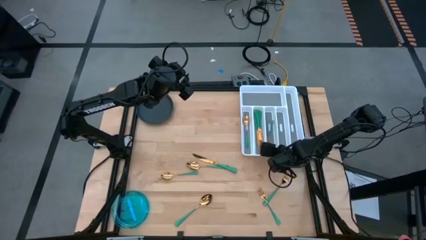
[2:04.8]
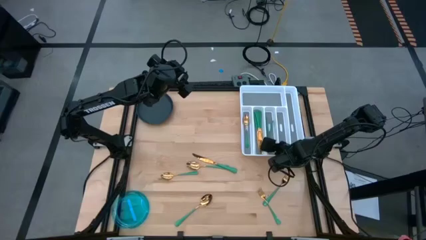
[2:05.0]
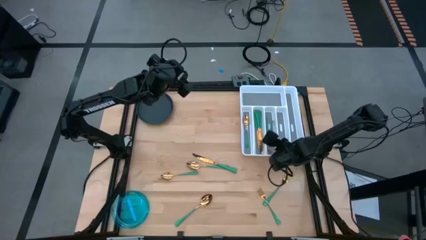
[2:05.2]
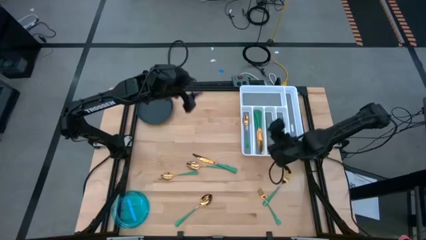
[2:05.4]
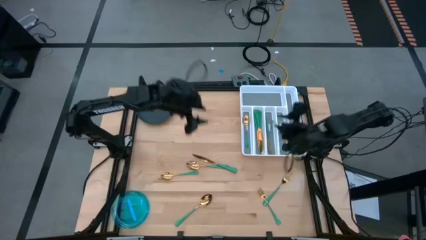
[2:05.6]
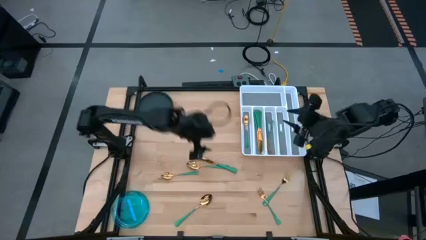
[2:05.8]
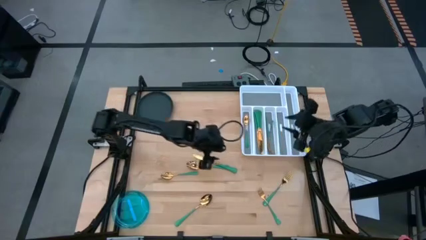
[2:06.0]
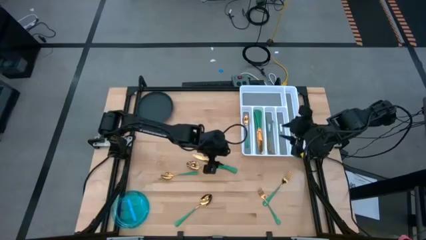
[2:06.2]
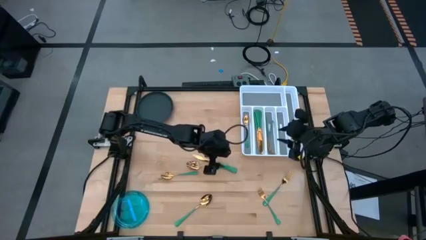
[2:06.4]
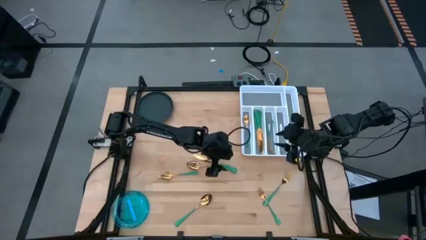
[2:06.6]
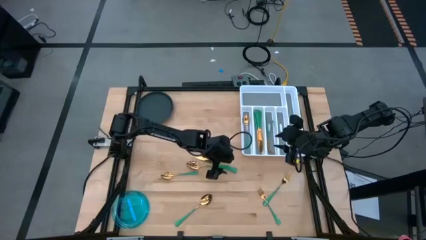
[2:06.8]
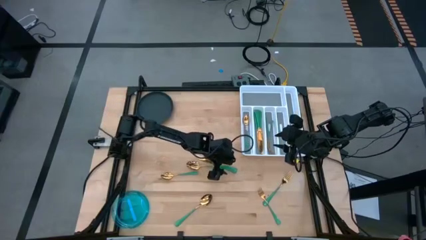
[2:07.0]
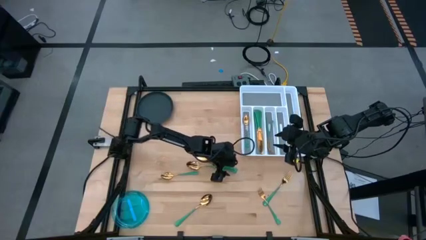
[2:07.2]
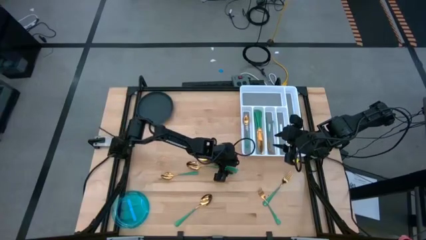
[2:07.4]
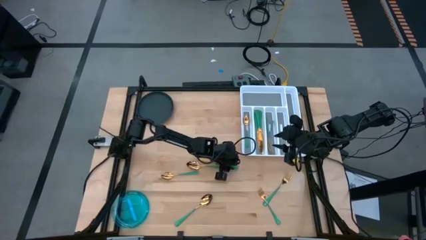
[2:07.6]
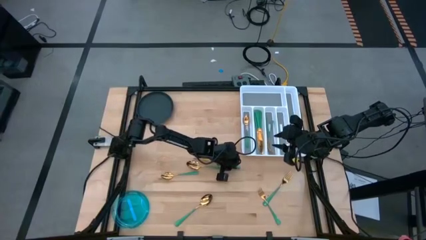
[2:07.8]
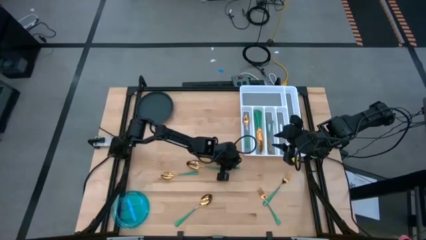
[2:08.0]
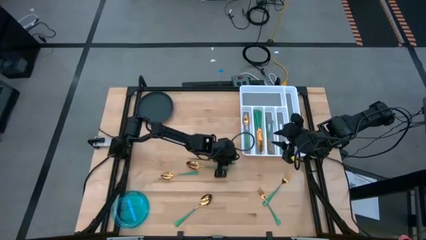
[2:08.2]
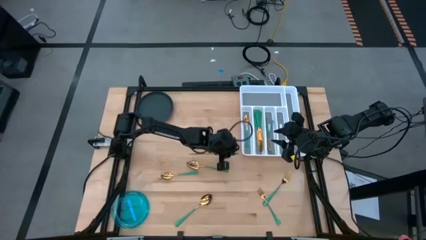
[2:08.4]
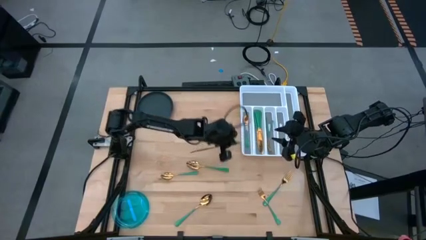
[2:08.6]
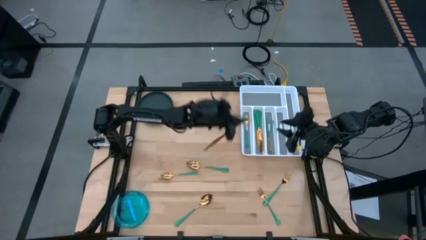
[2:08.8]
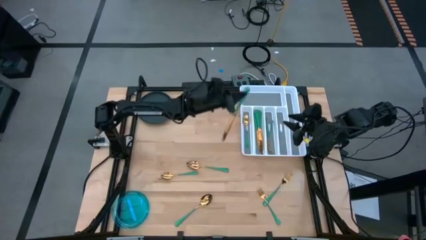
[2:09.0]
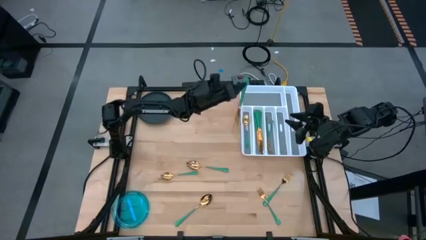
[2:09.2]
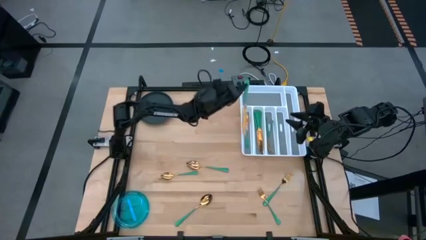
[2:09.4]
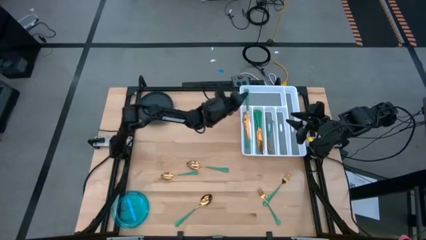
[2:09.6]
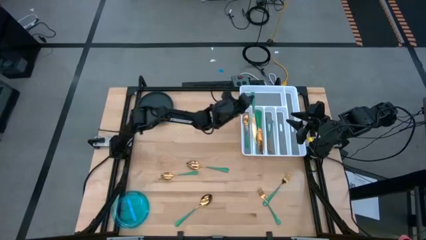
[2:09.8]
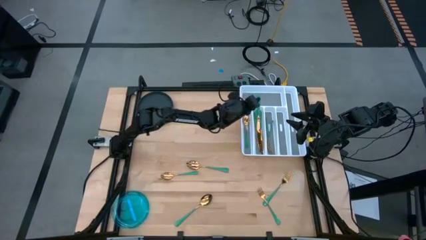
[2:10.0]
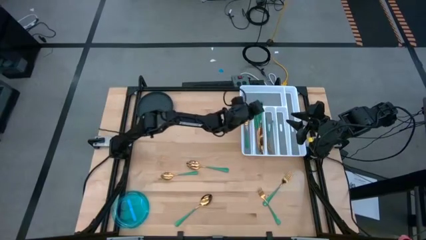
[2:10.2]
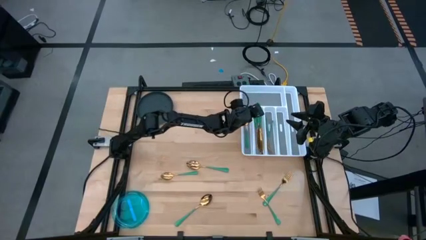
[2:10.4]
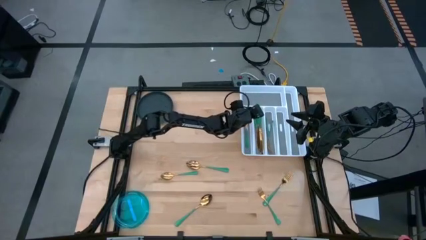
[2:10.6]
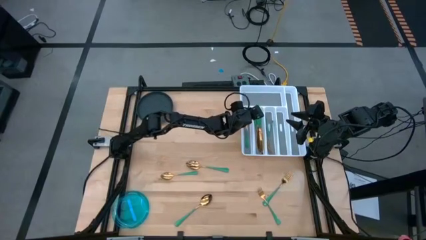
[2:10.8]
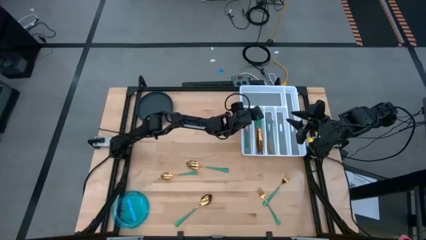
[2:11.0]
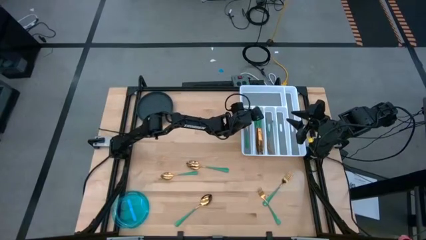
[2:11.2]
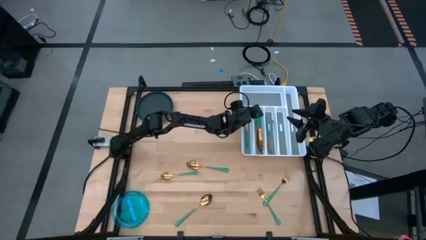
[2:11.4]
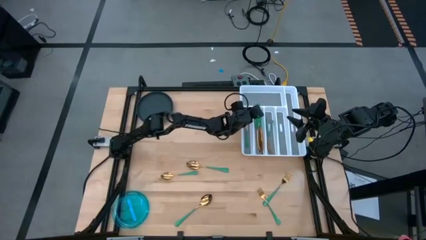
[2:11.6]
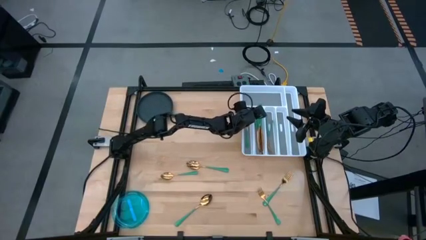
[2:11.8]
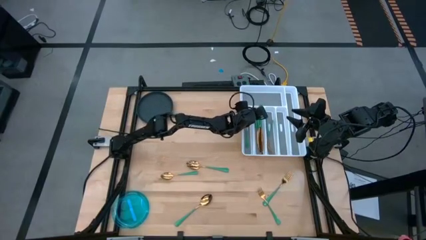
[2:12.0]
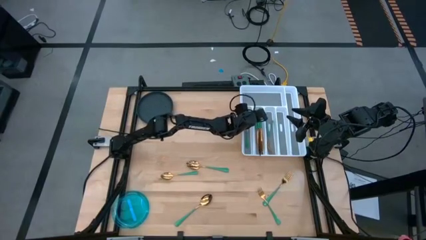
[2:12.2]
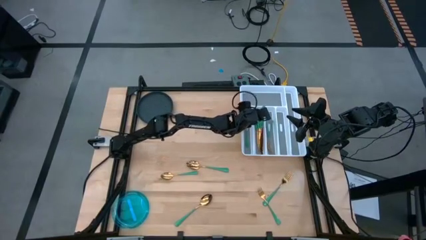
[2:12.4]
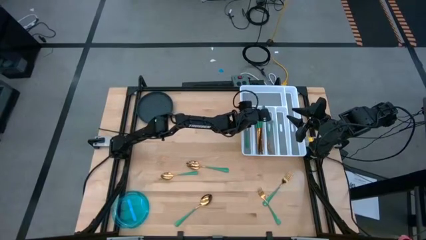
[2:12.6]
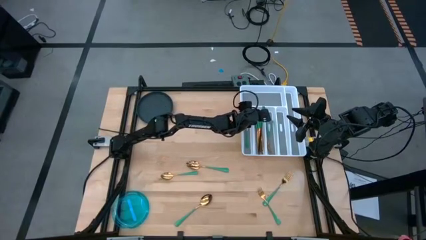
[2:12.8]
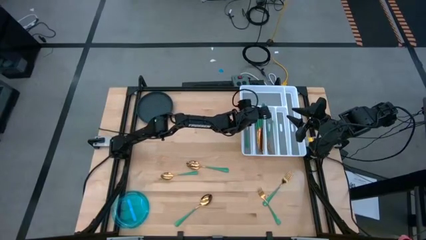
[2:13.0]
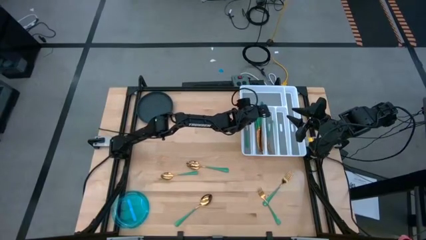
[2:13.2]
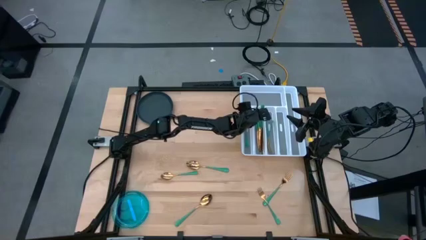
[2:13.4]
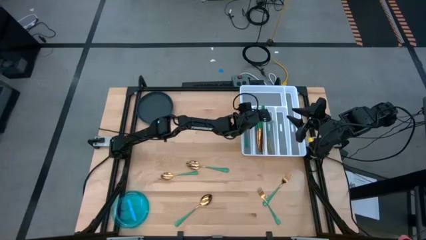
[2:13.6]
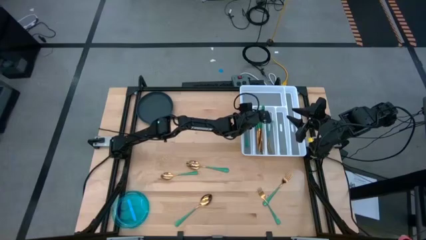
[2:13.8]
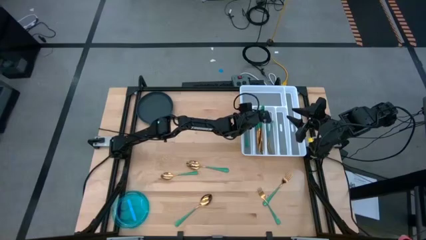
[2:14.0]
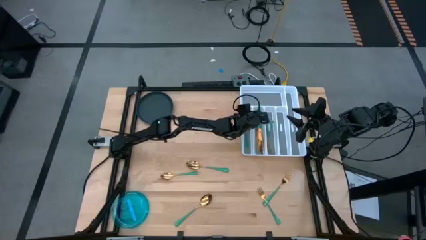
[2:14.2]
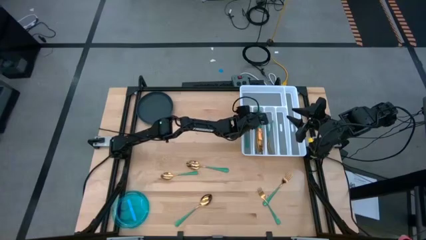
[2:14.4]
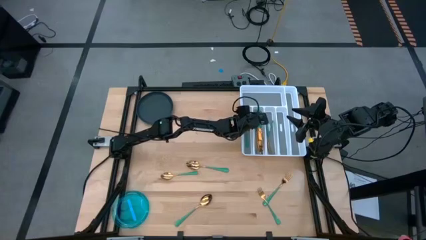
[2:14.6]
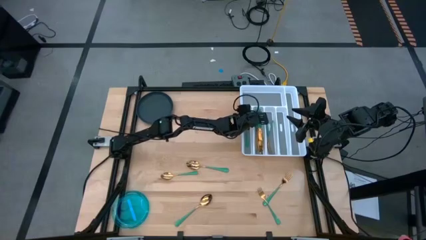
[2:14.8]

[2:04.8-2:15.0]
Task: Sort silverware
Put the green knife into the silverware tray
